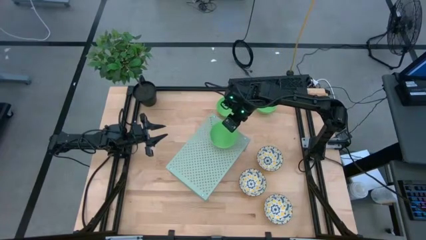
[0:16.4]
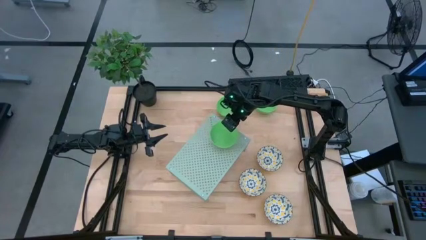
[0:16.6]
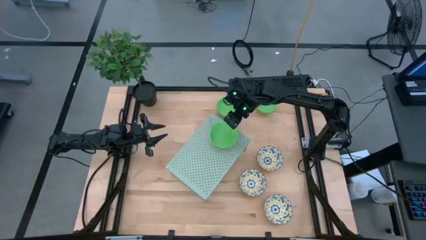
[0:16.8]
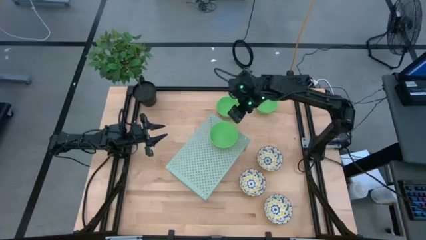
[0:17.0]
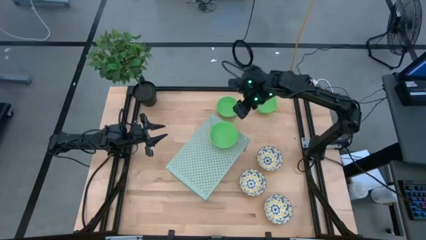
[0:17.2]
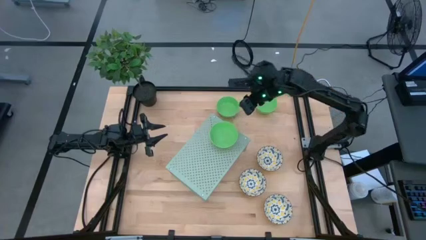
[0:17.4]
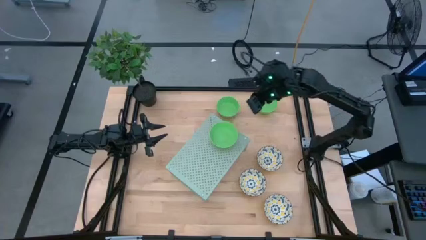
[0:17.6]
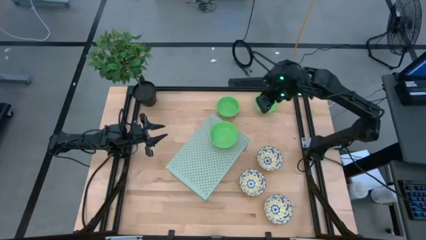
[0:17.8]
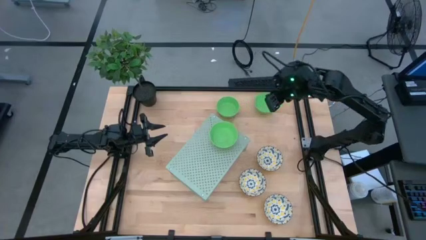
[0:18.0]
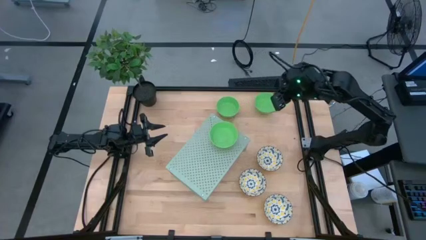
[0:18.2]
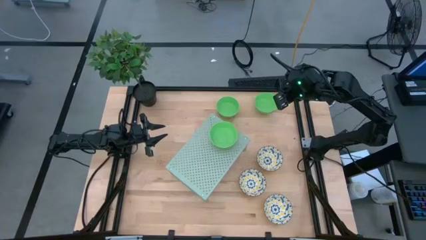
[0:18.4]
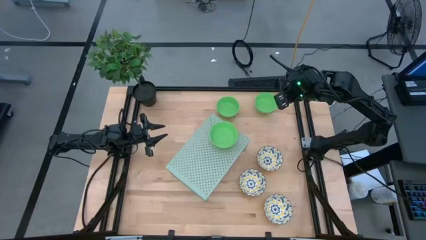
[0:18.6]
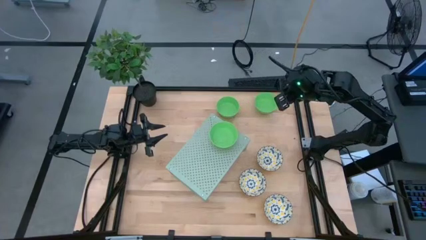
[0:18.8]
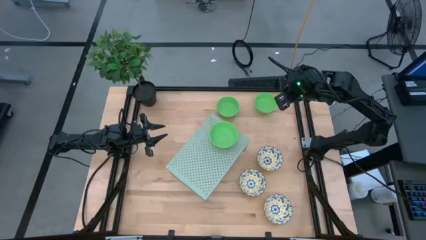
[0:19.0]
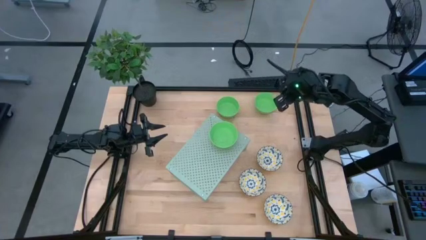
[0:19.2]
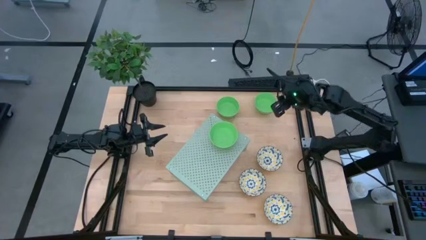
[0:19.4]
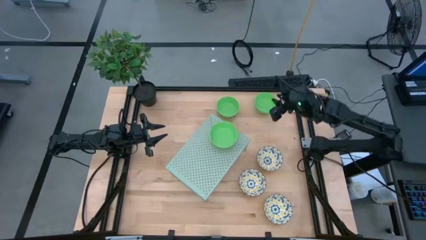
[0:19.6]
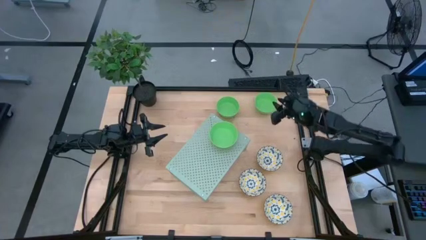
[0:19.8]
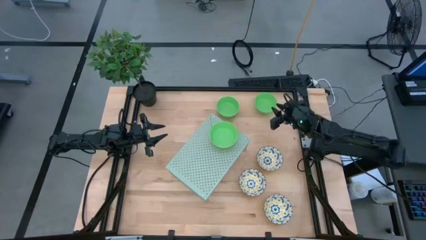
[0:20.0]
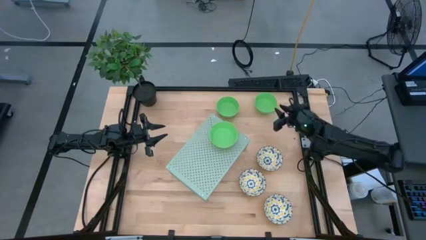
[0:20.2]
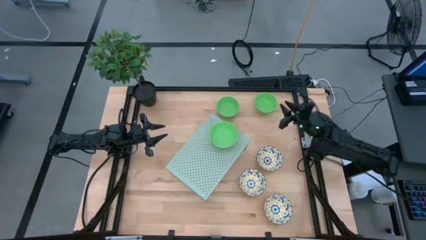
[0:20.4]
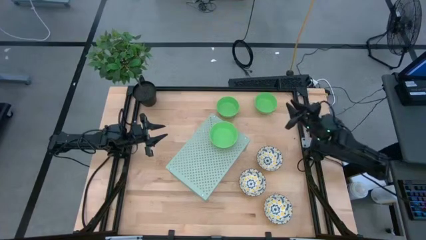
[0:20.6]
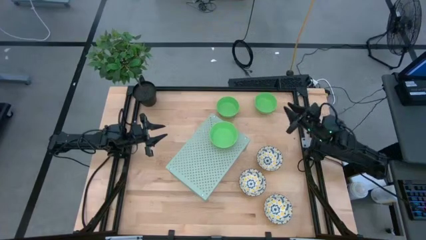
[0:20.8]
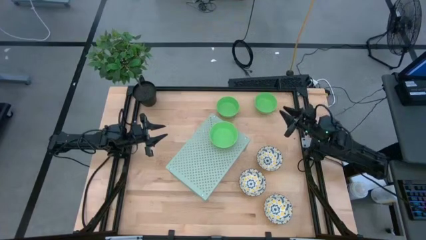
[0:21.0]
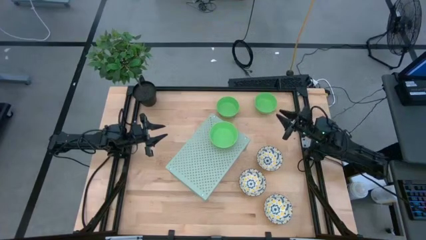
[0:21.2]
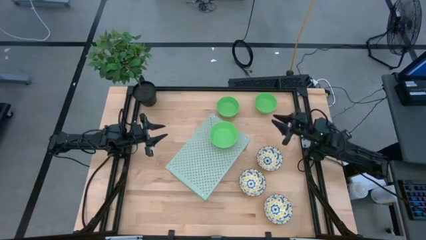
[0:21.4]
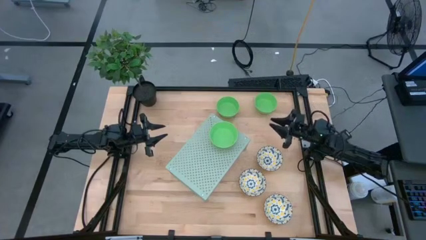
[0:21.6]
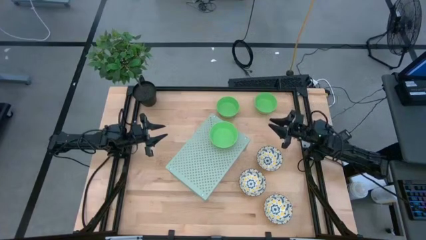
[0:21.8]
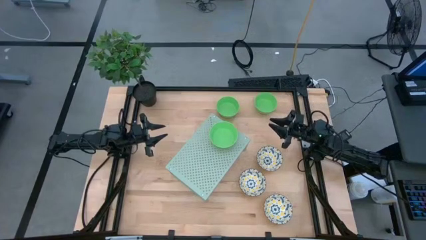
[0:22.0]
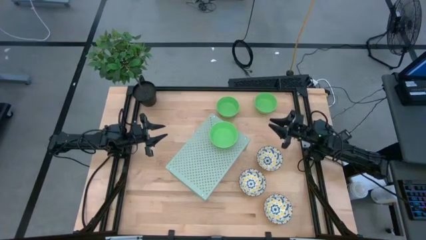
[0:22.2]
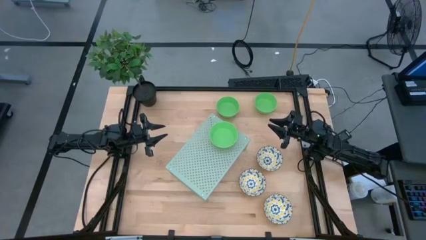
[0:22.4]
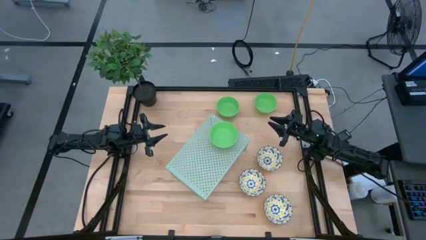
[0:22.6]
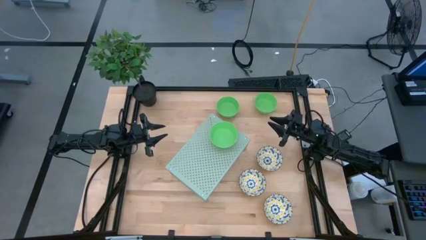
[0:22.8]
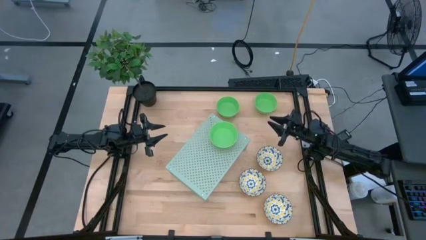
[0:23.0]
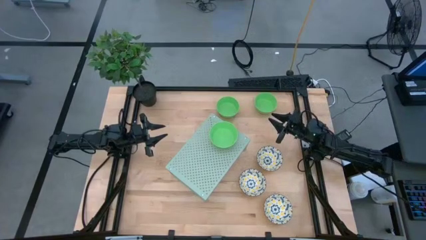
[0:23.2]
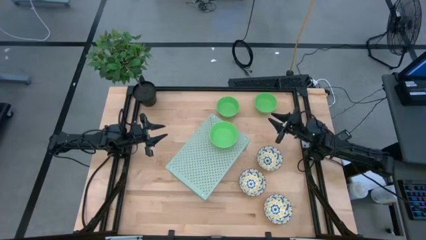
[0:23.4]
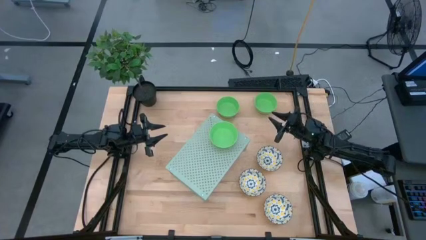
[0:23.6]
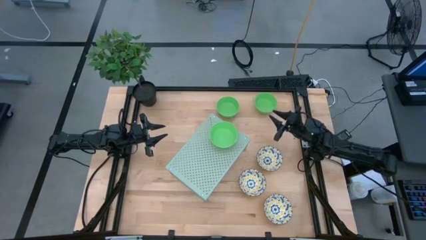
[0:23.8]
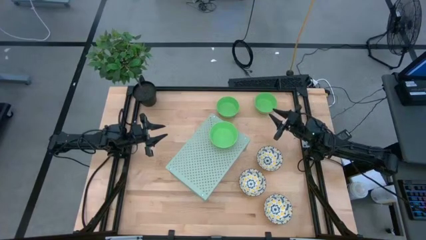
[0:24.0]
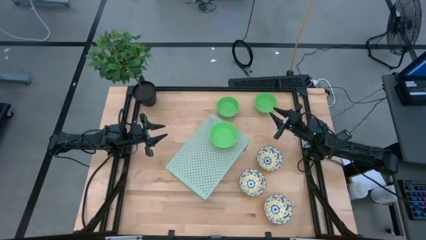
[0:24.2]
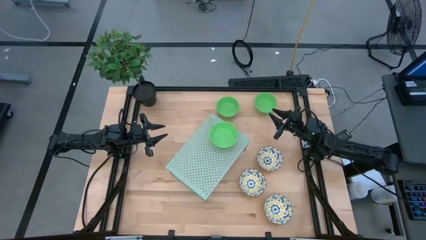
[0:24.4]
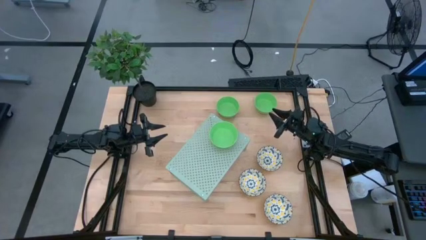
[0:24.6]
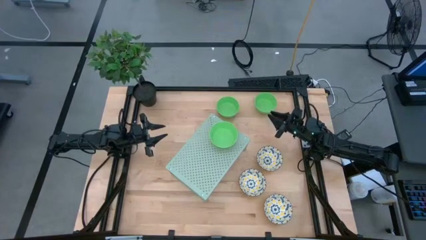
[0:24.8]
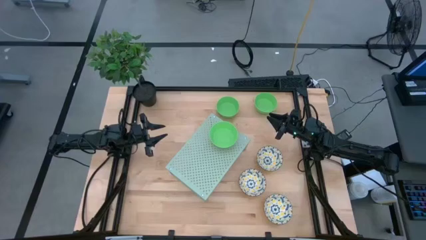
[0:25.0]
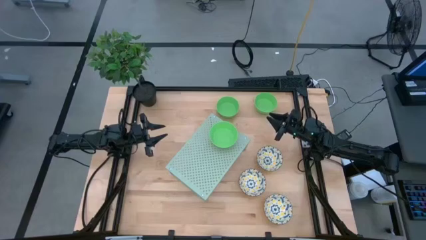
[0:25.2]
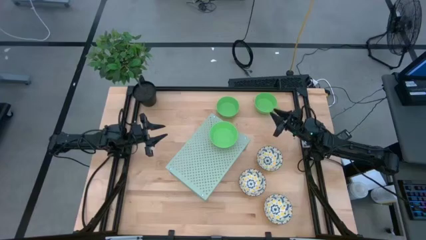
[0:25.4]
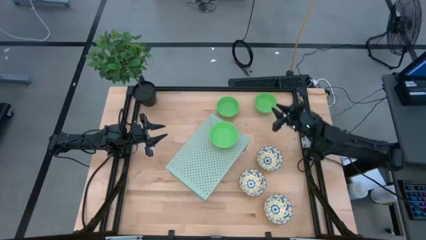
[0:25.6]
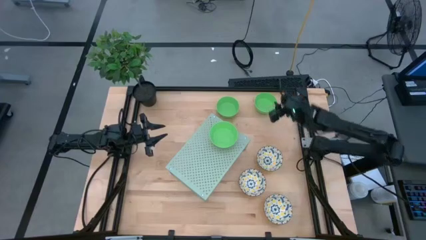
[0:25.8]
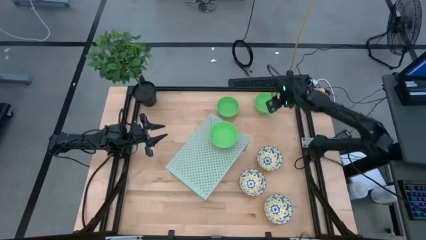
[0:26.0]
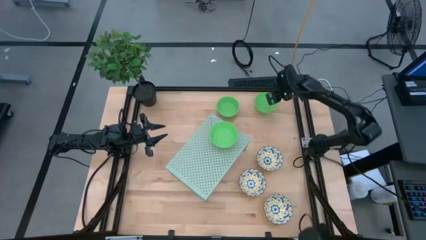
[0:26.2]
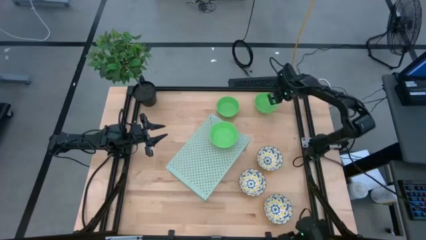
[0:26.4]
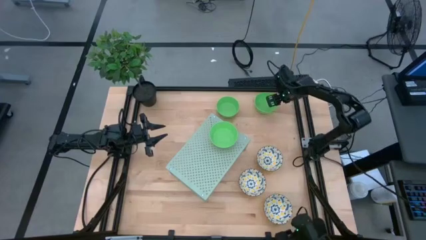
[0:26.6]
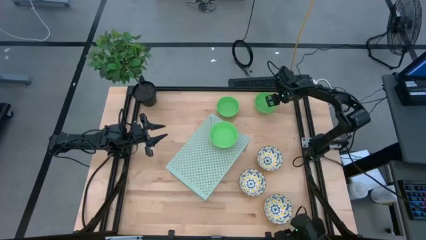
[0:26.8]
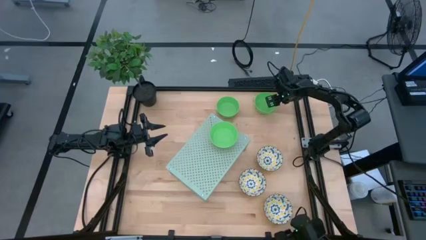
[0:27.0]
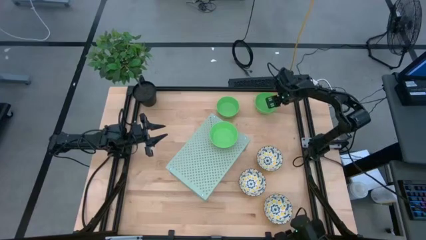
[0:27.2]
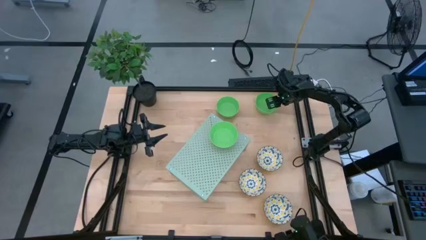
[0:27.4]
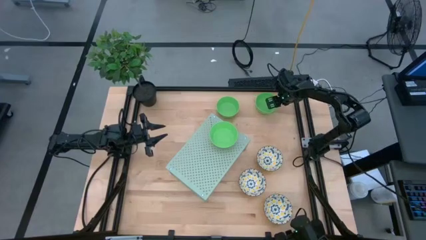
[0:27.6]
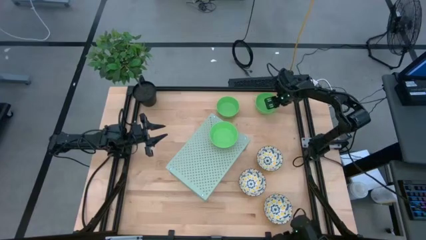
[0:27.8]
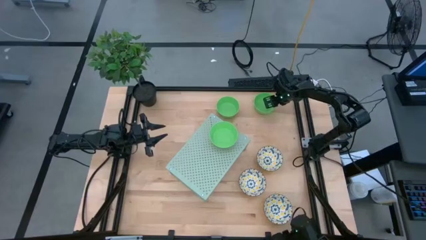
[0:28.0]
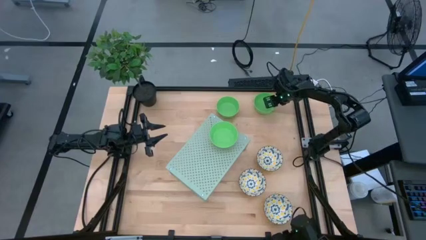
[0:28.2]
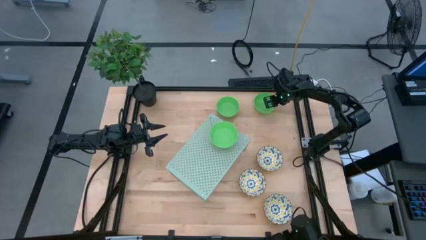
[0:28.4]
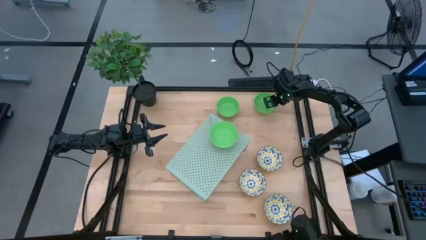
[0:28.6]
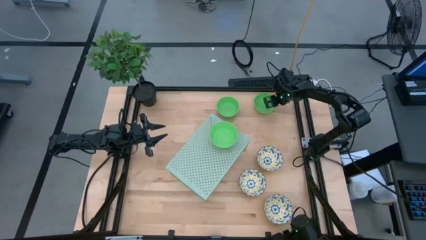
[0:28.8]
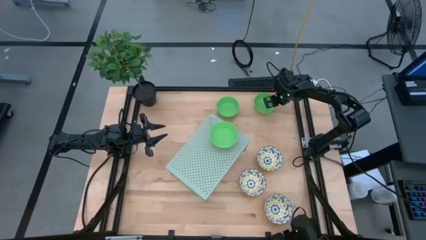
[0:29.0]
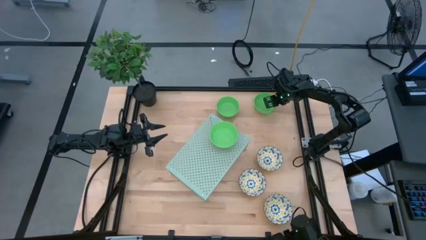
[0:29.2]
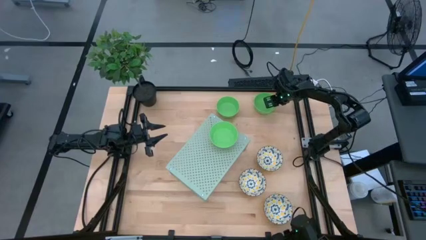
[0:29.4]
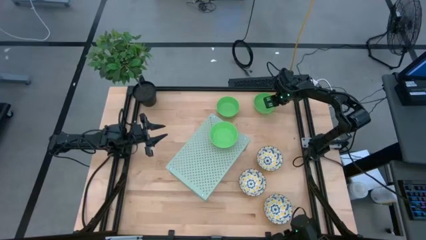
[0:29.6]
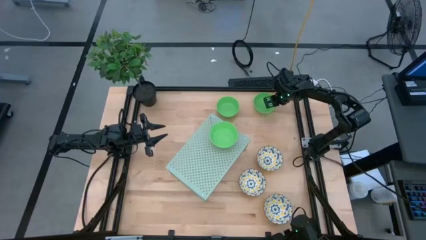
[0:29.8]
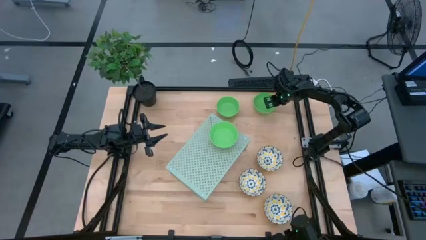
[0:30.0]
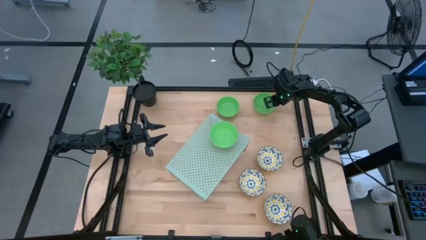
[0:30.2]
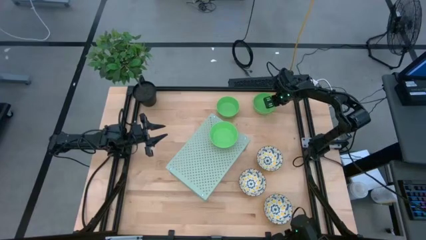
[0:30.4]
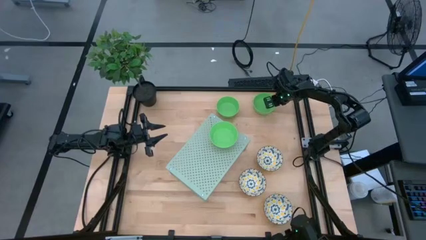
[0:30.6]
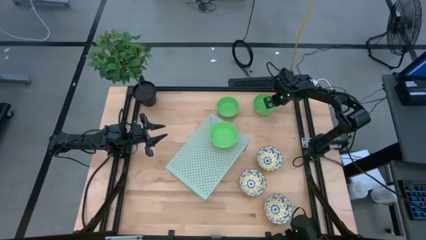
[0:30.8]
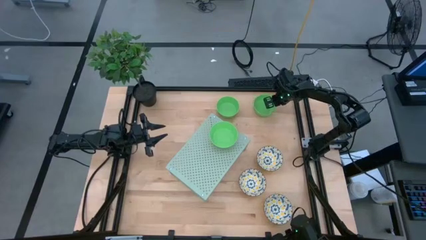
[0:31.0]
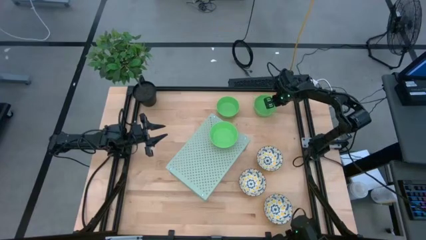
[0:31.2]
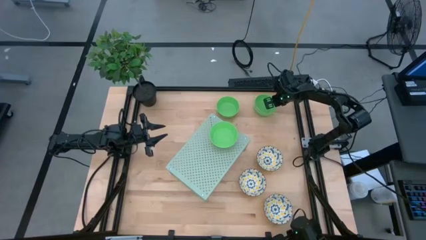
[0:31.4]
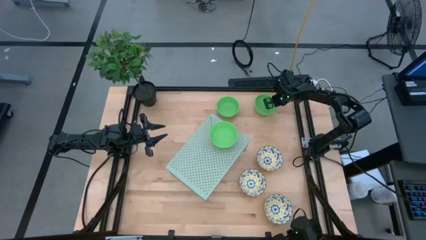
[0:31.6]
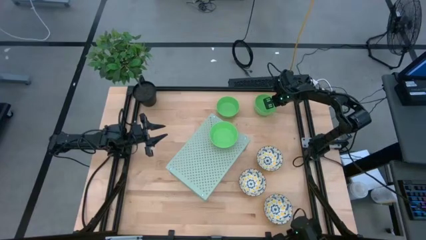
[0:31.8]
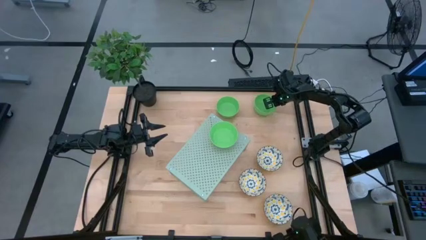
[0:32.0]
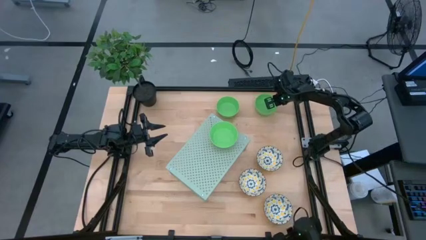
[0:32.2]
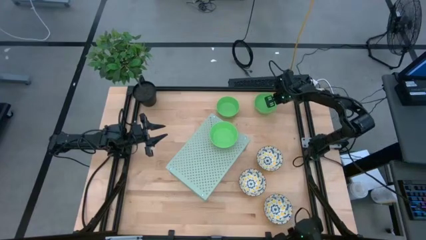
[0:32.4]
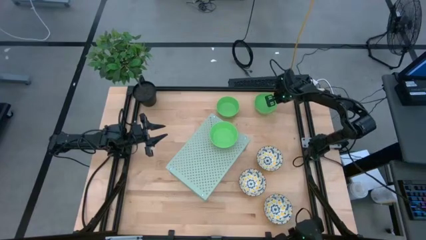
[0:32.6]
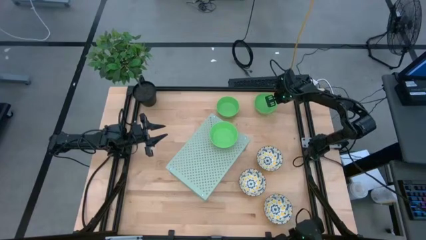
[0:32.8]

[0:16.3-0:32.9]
Task: Pick & Place Mini bowls
Stack the right green bowl on the green bowl on the shelf
